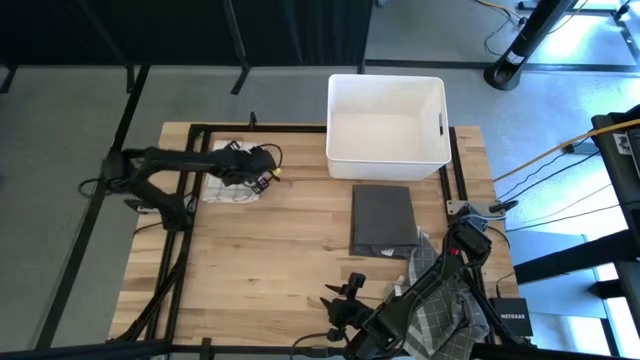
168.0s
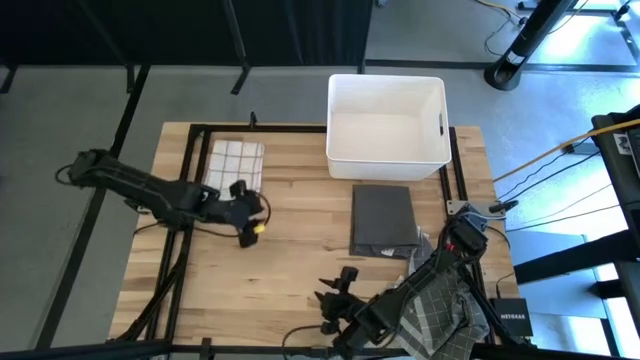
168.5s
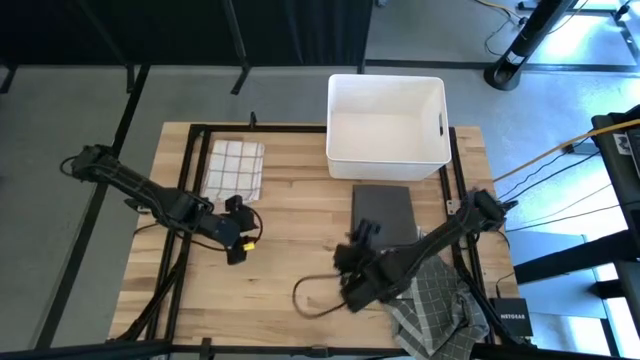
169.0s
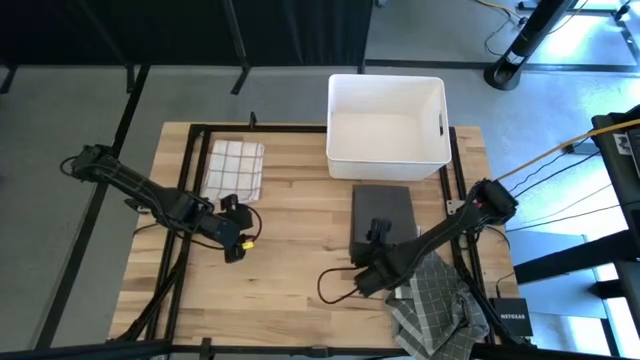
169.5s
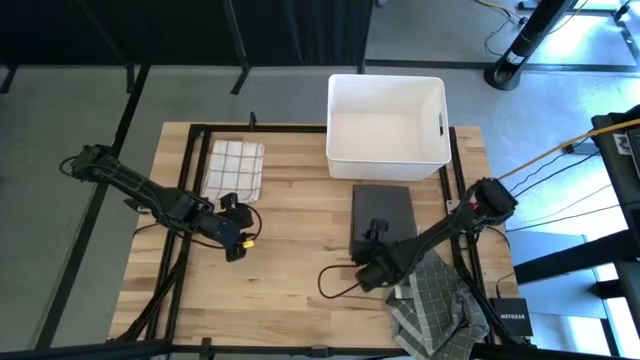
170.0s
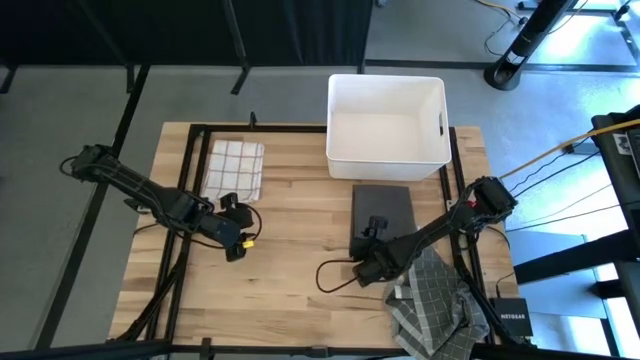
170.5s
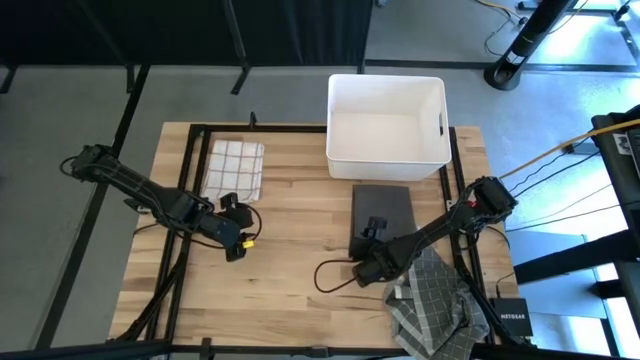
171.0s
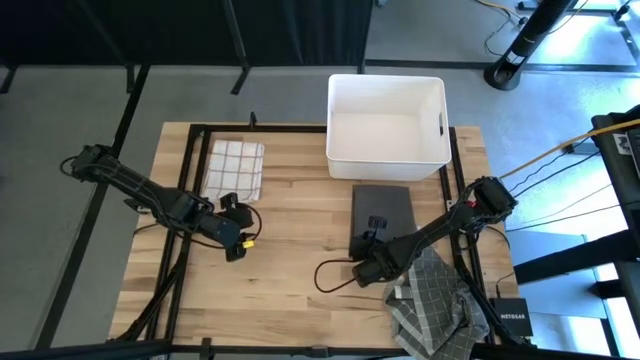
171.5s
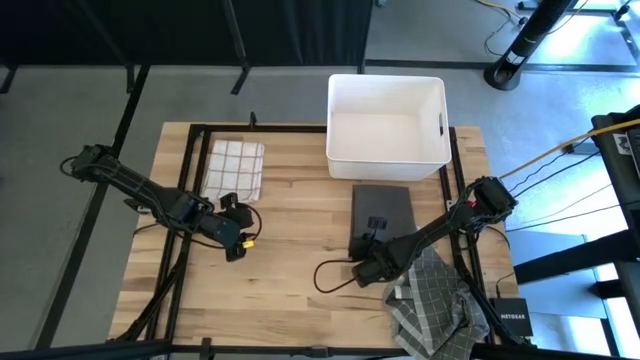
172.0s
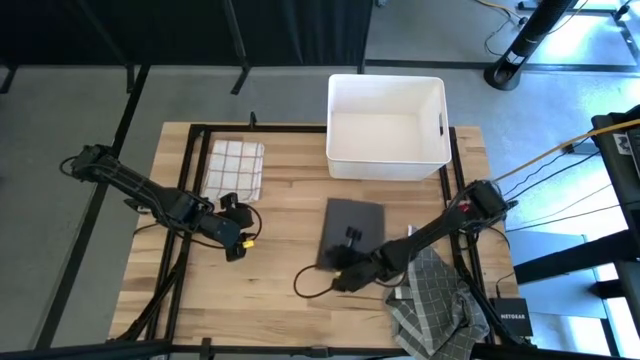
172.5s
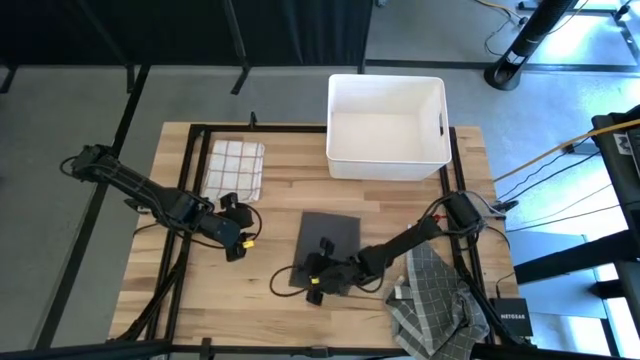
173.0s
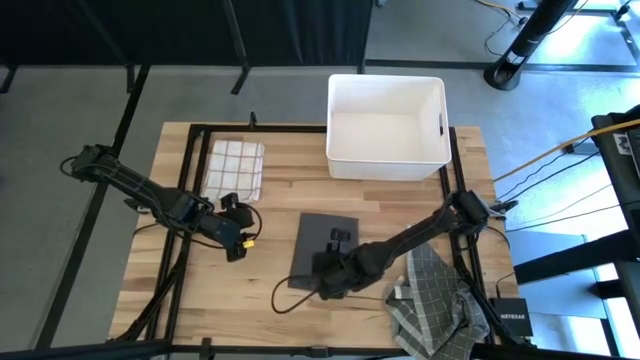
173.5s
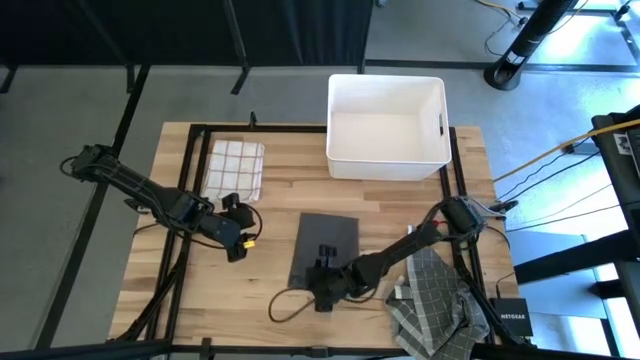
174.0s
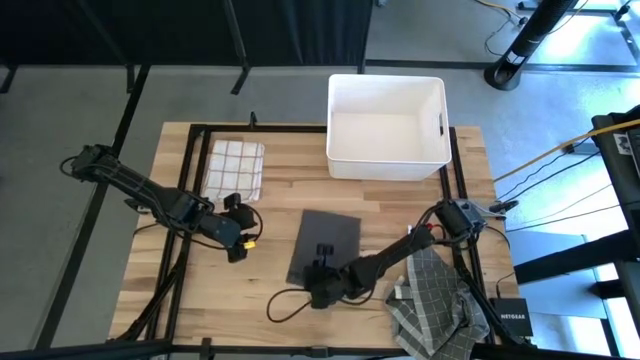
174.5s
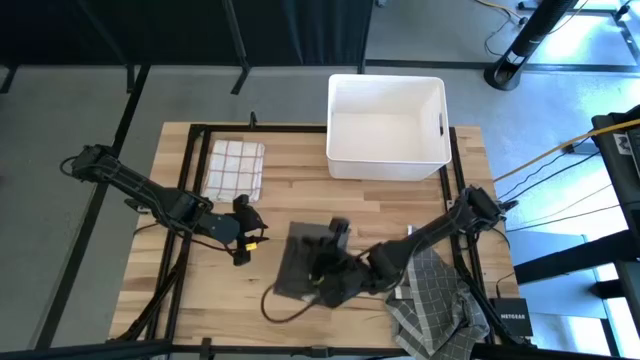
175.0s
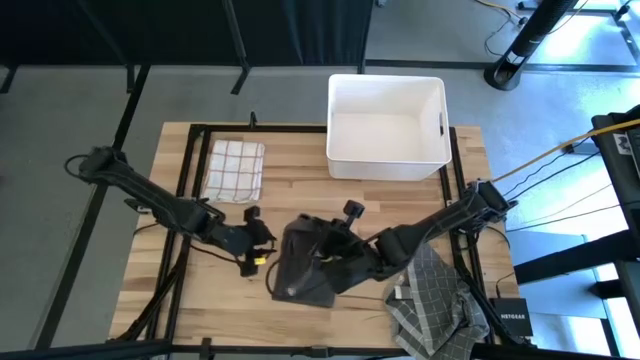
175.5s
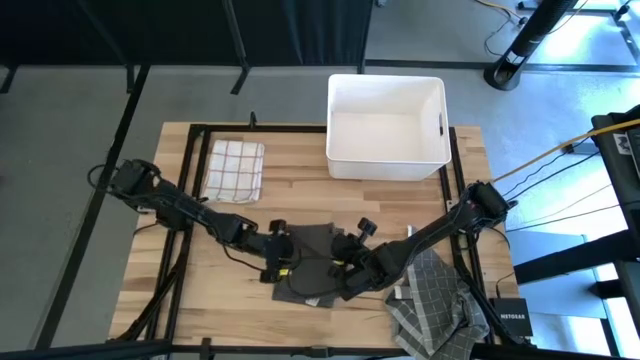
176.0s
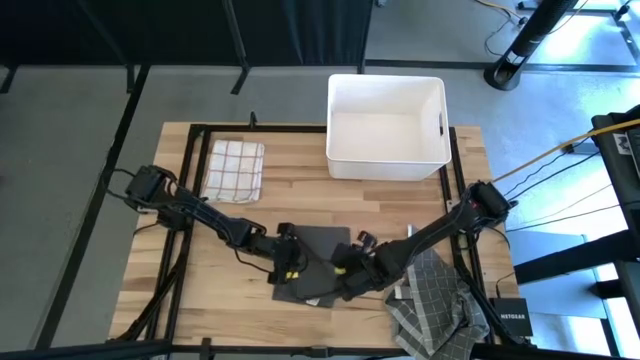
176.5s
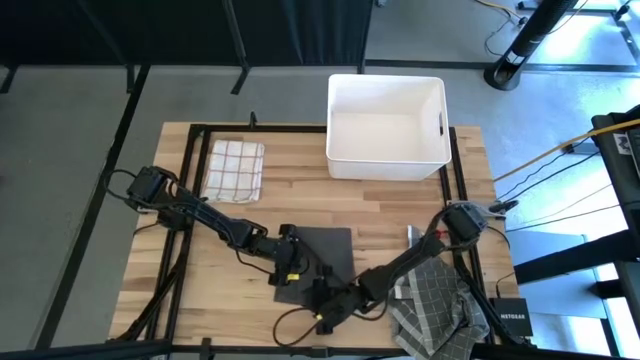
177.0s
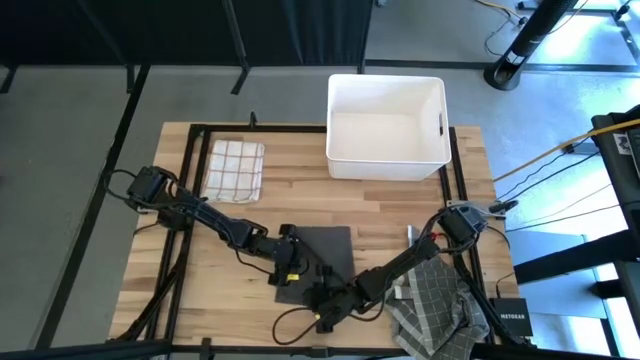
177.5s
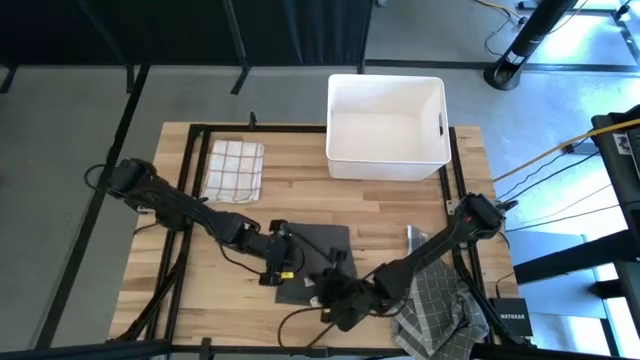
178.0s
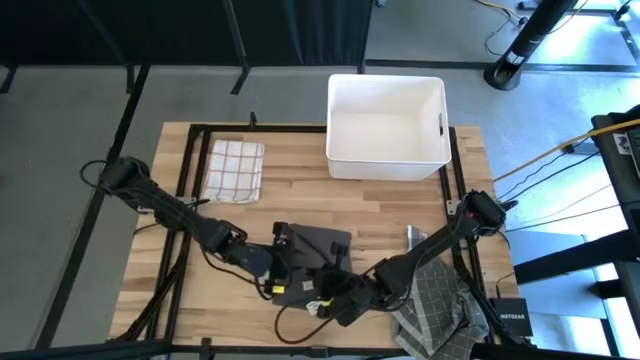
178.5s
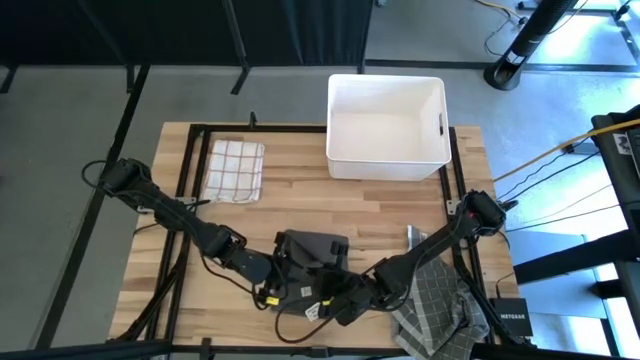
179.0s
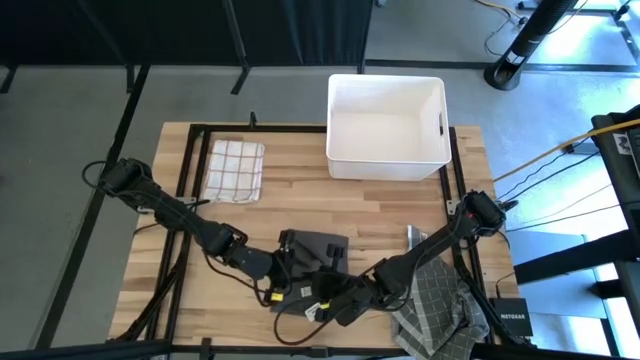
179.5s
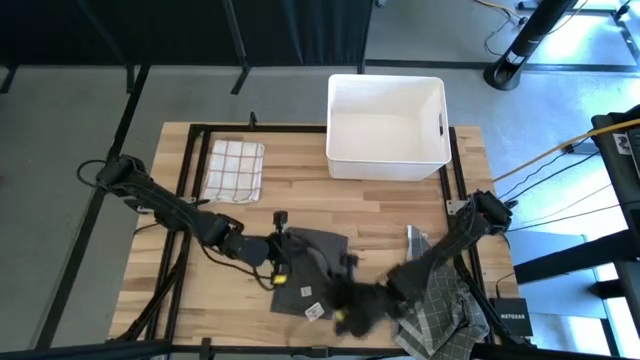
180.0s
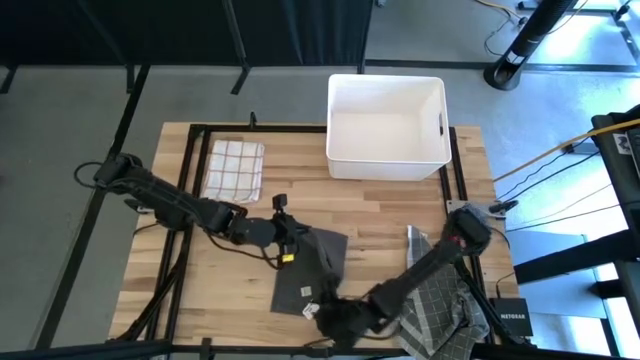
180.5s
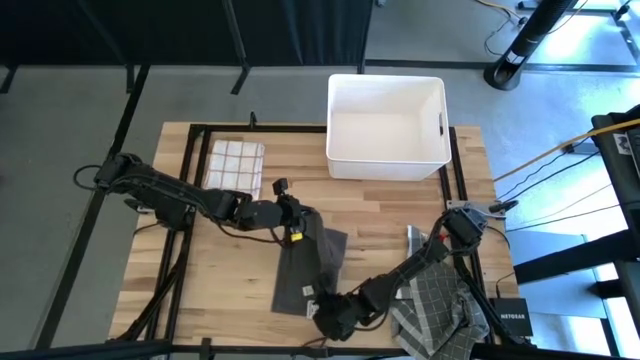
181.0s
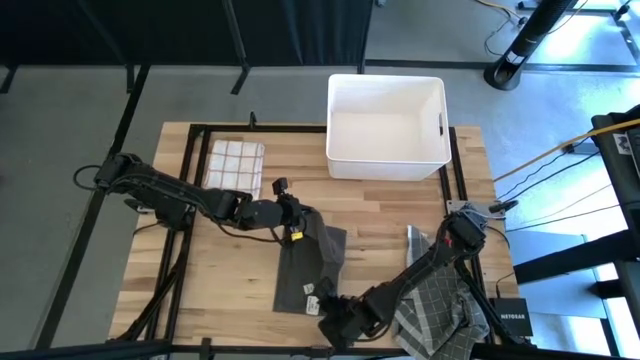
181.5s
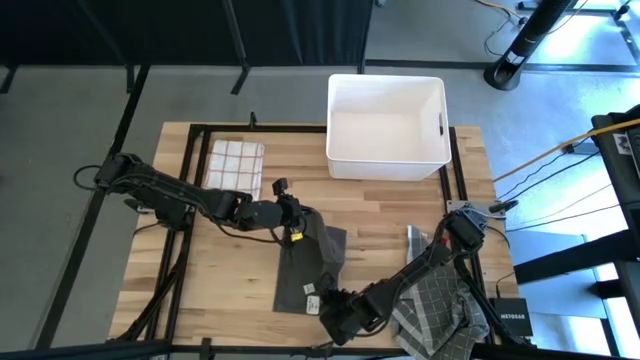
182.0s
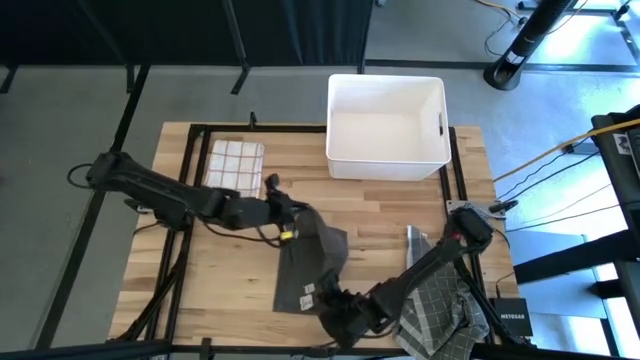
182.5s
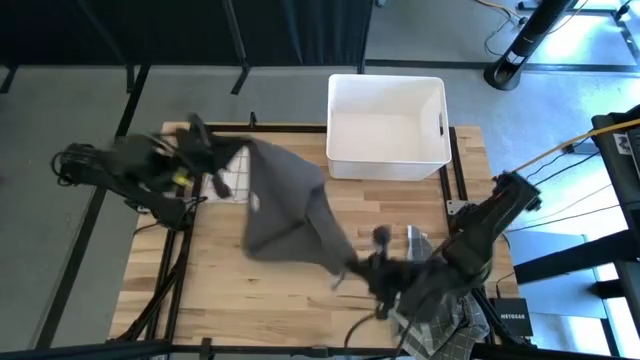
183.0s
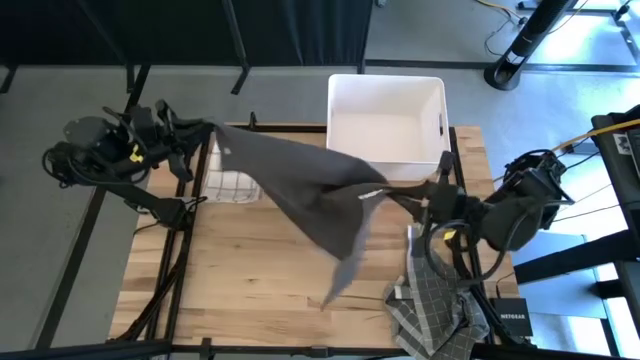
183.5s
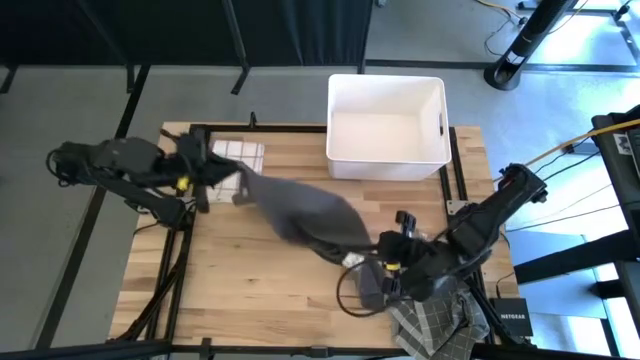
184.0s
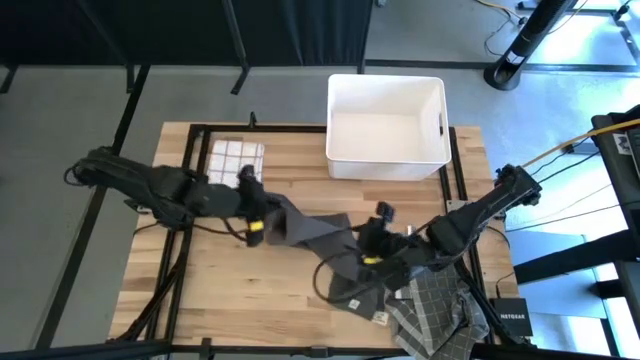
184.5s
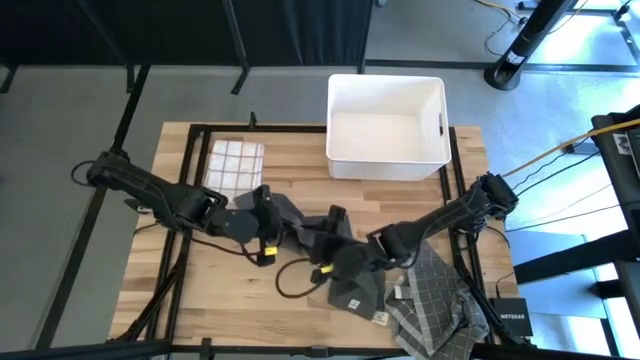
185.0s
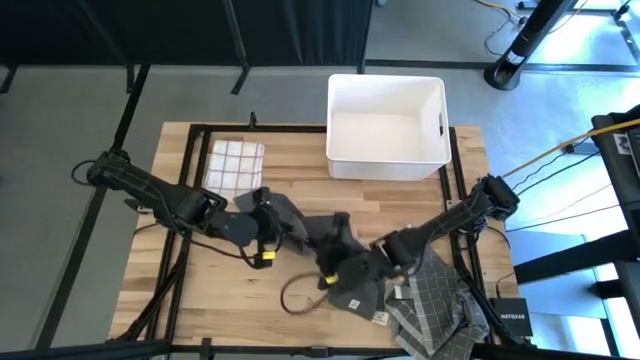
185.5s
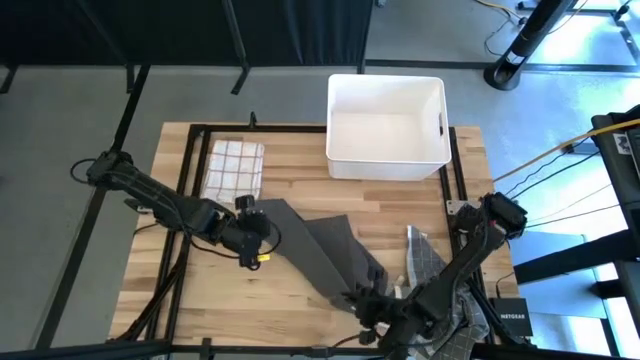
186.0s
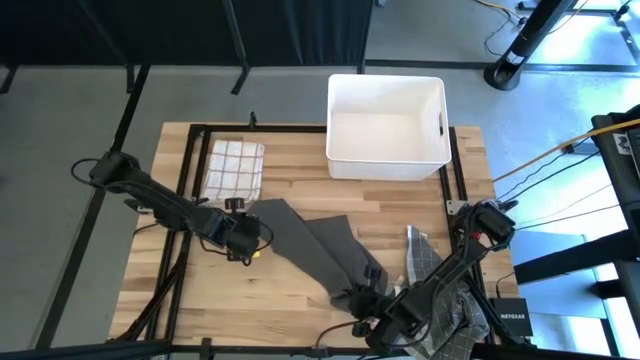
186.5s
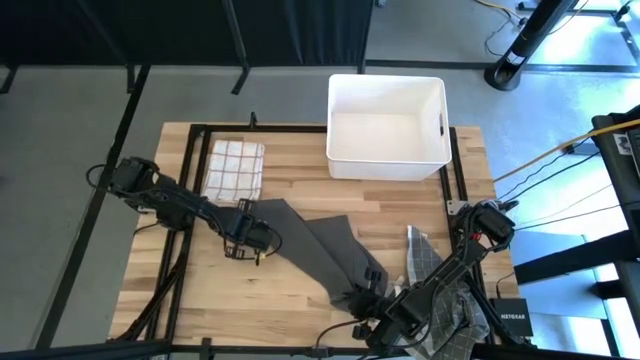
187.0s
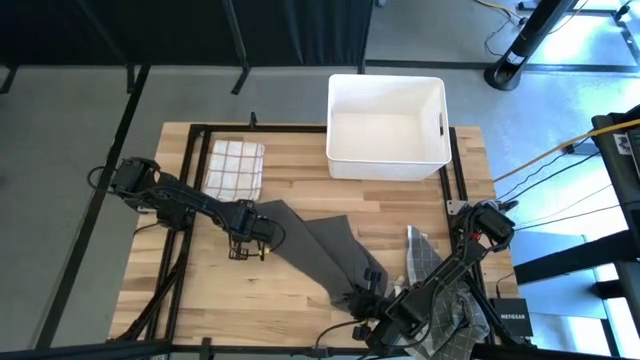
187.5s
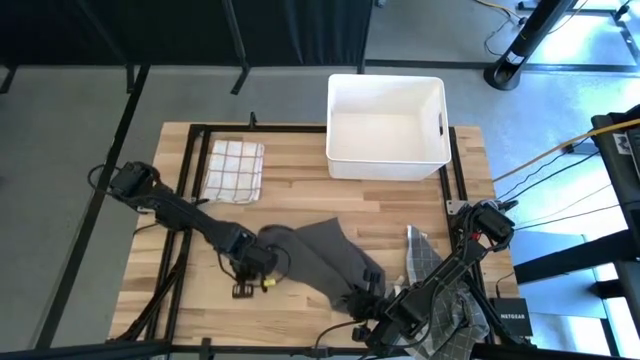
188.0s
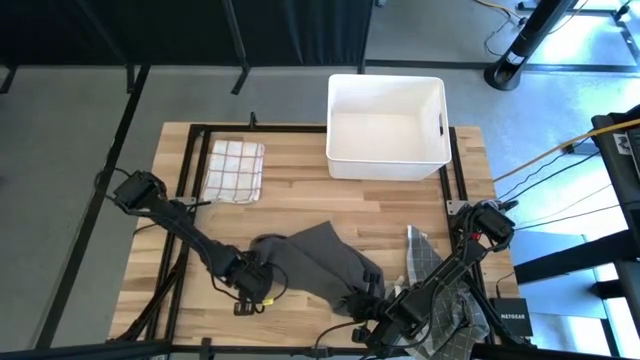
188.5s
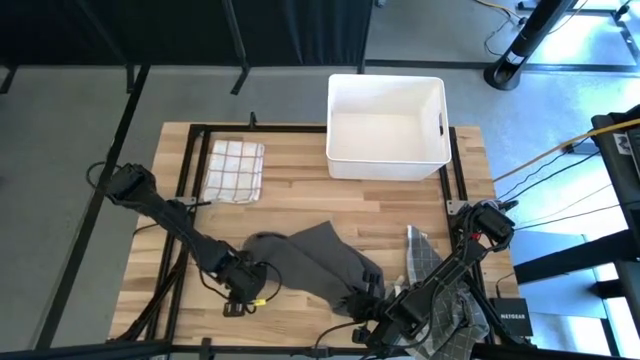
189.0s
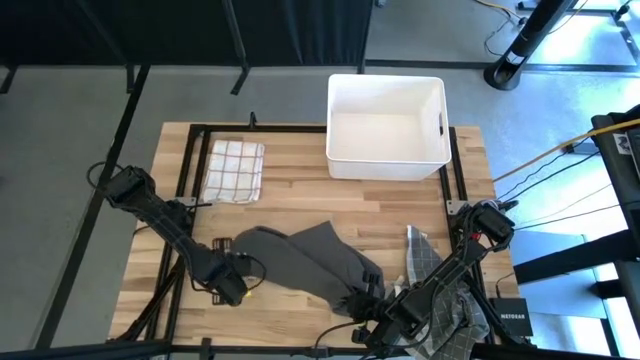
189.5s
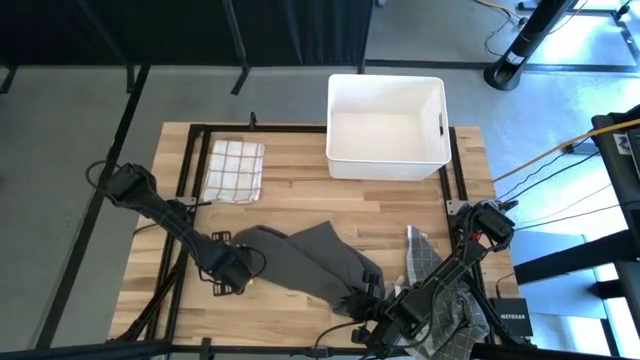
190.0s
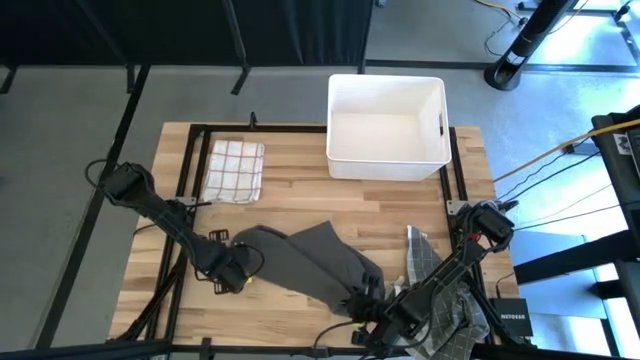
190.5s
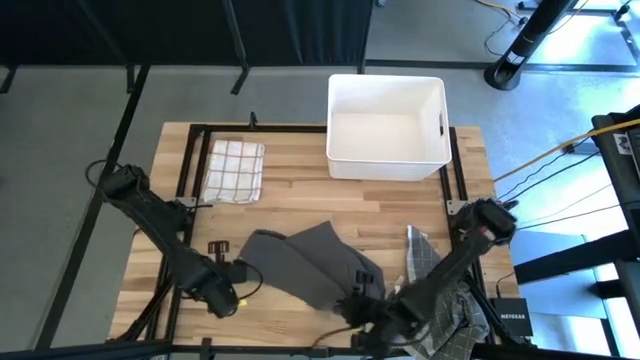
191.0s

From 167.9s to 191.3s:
Task: Fold towel
Fold the grey towel and put beside the white towel
